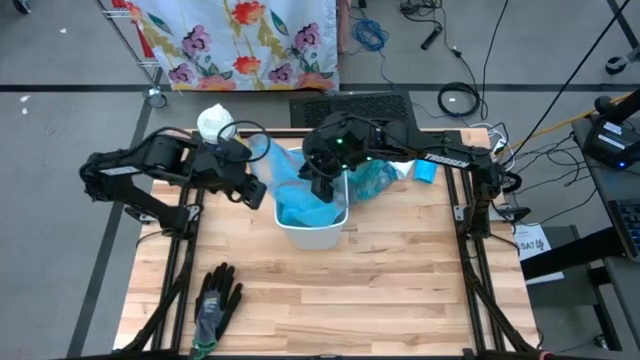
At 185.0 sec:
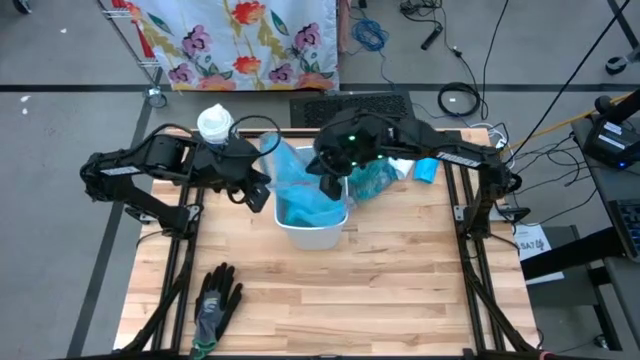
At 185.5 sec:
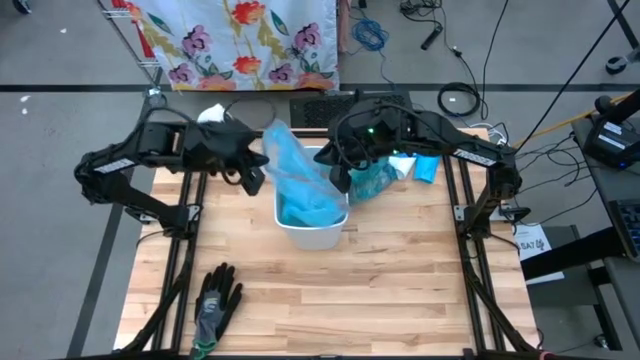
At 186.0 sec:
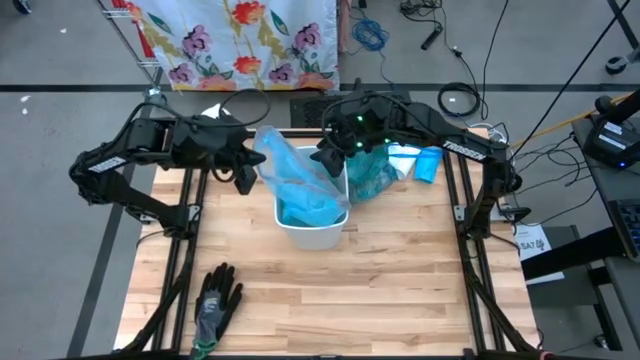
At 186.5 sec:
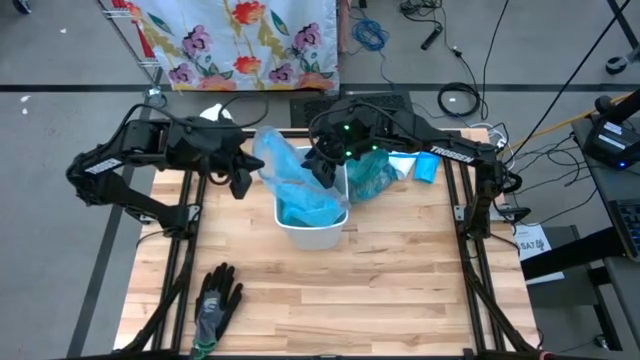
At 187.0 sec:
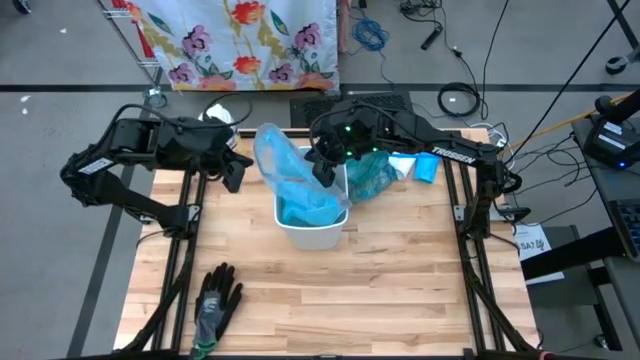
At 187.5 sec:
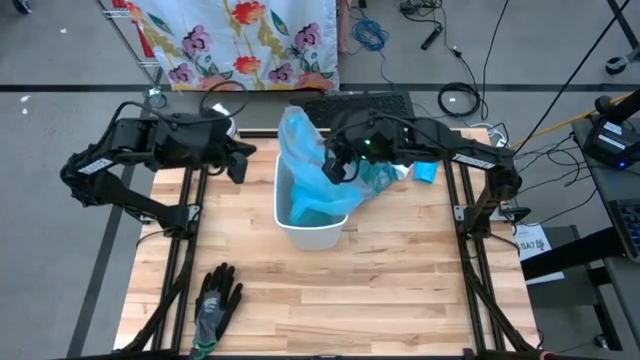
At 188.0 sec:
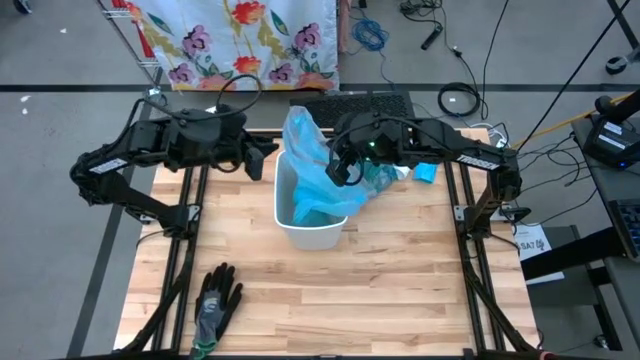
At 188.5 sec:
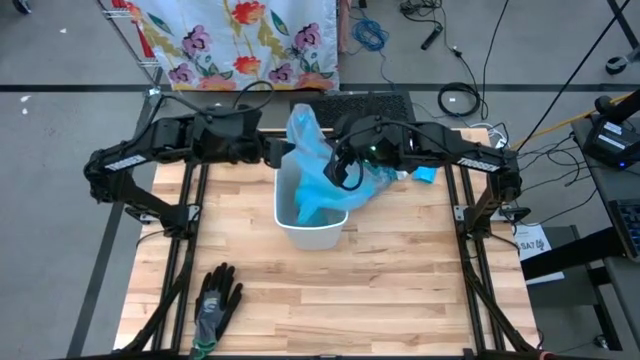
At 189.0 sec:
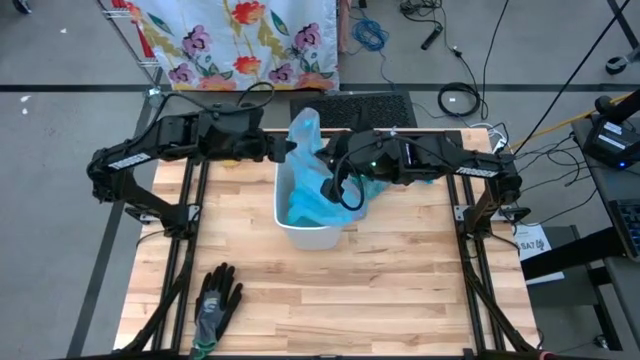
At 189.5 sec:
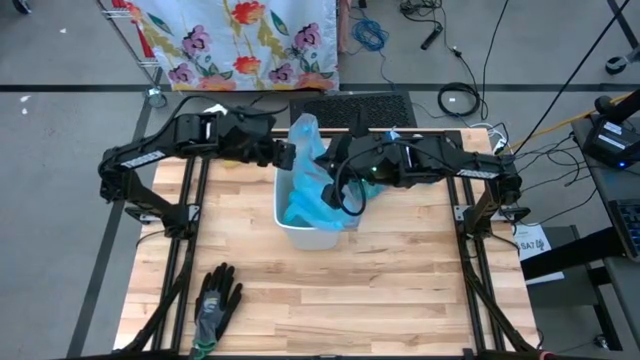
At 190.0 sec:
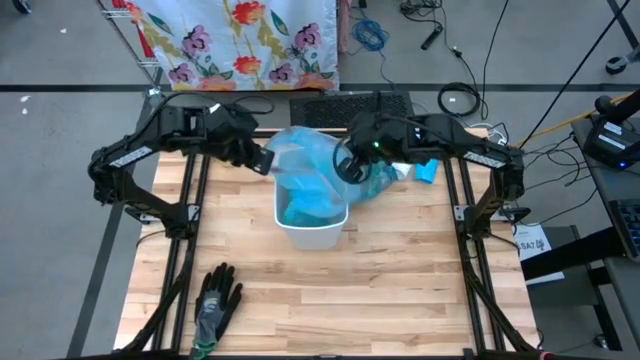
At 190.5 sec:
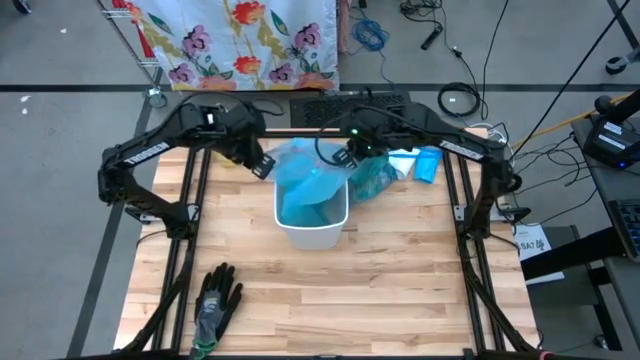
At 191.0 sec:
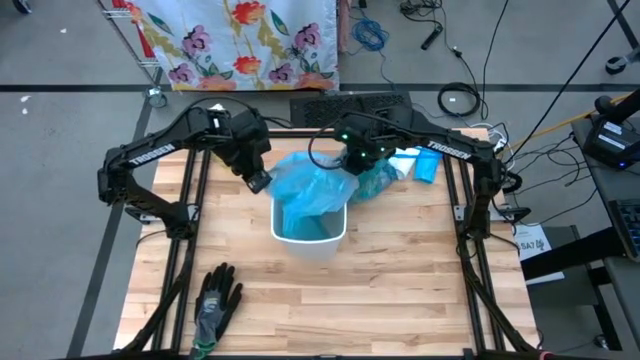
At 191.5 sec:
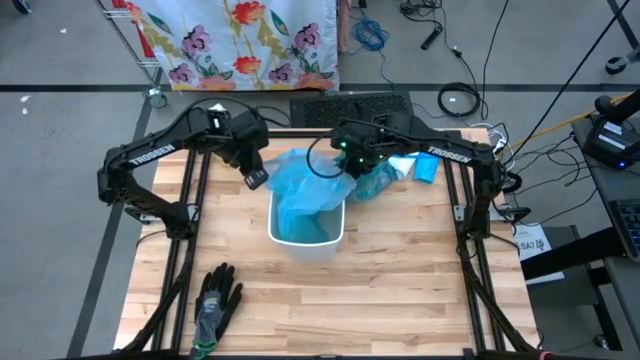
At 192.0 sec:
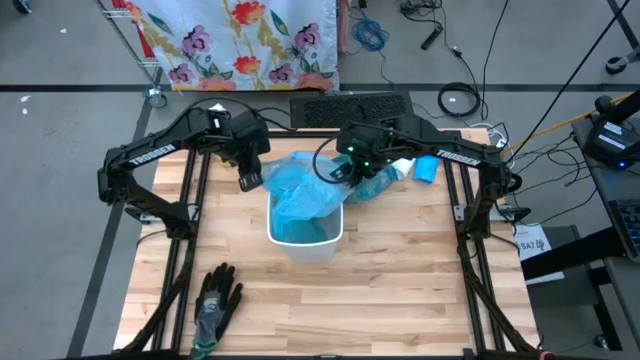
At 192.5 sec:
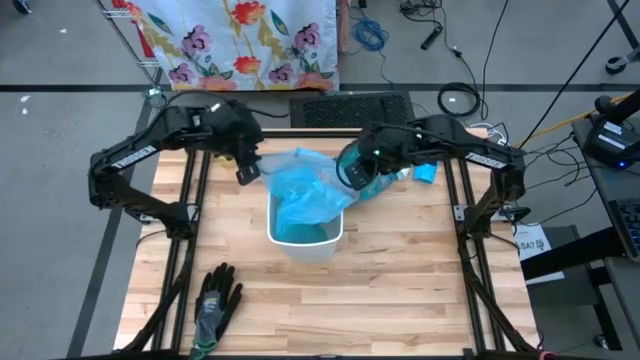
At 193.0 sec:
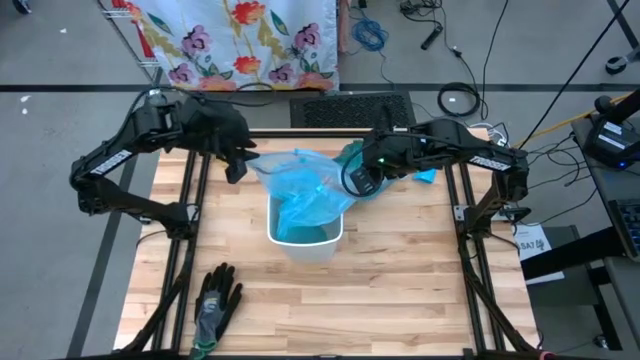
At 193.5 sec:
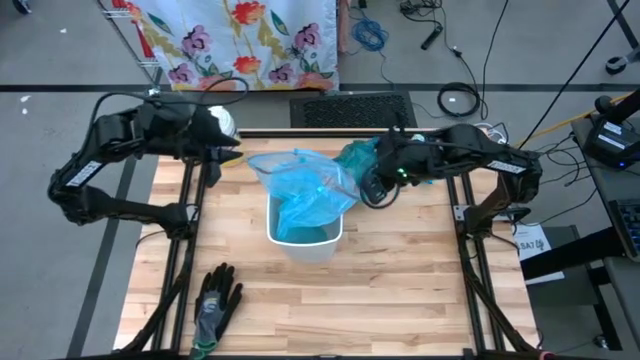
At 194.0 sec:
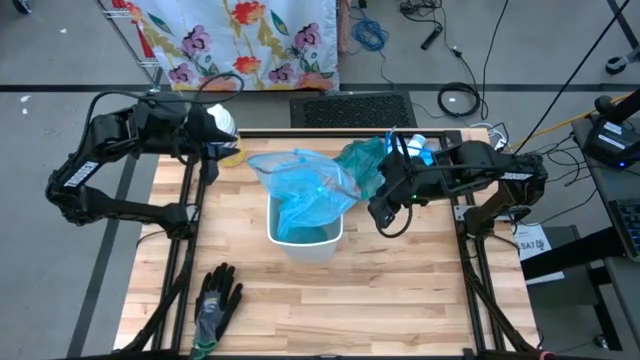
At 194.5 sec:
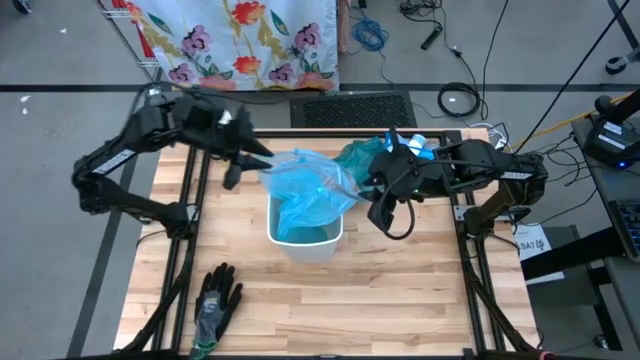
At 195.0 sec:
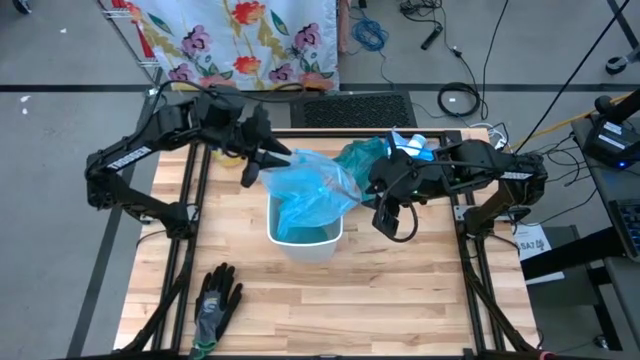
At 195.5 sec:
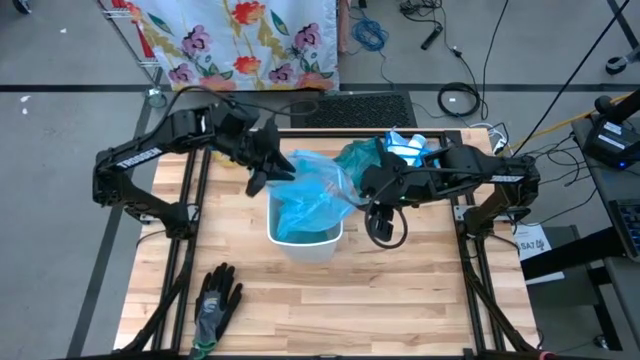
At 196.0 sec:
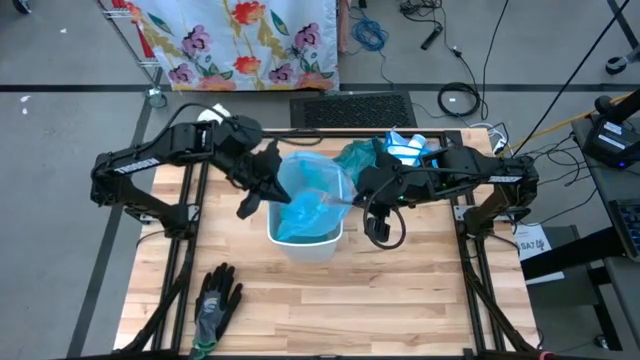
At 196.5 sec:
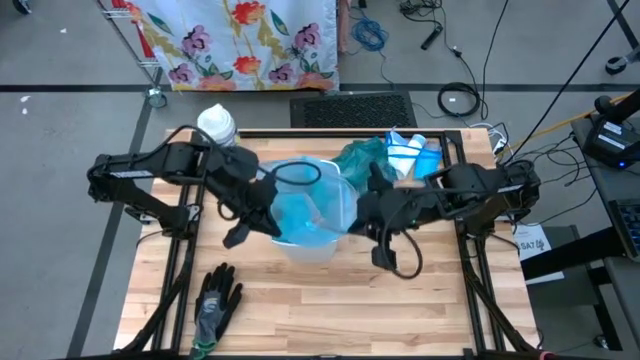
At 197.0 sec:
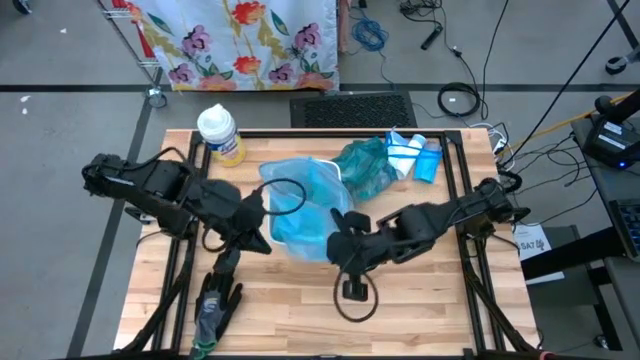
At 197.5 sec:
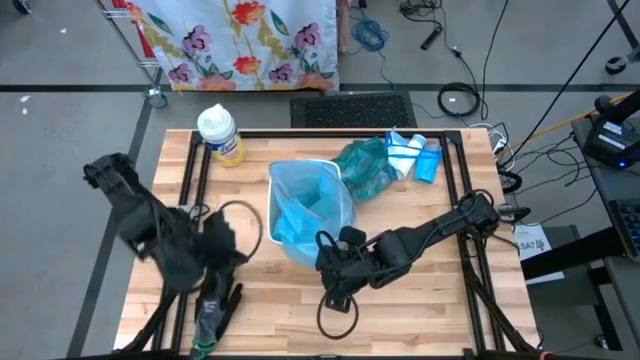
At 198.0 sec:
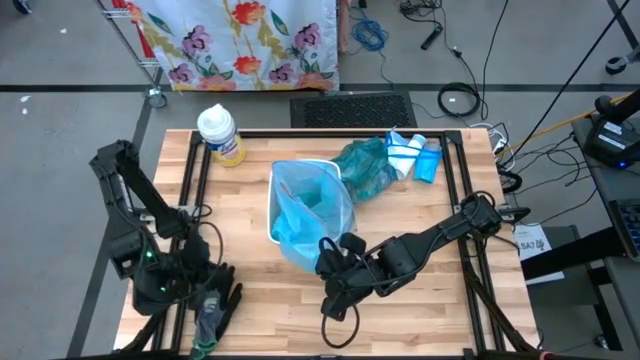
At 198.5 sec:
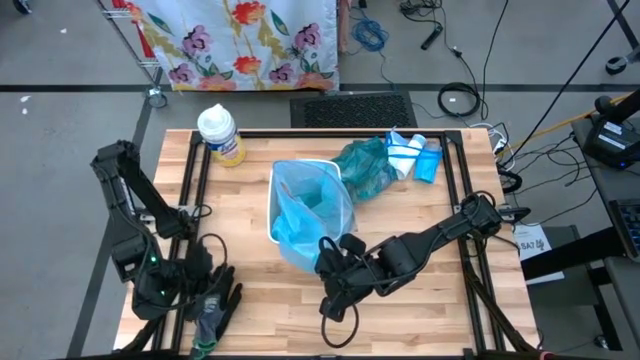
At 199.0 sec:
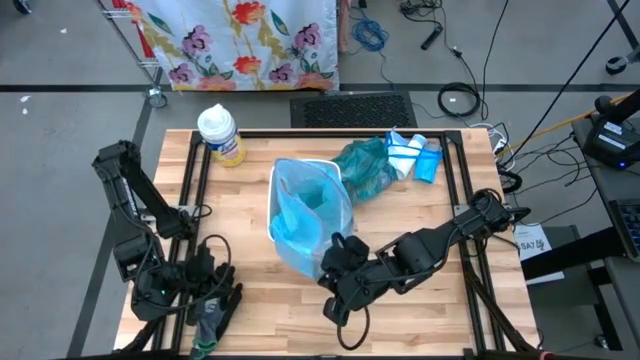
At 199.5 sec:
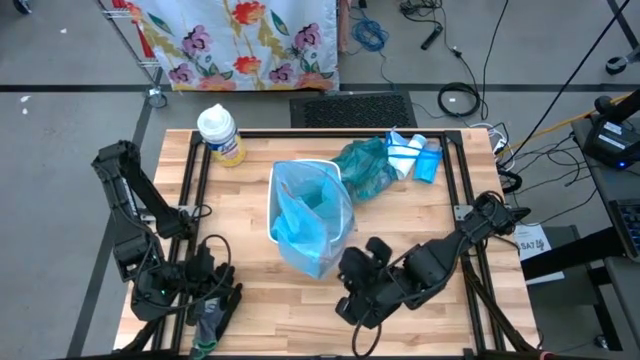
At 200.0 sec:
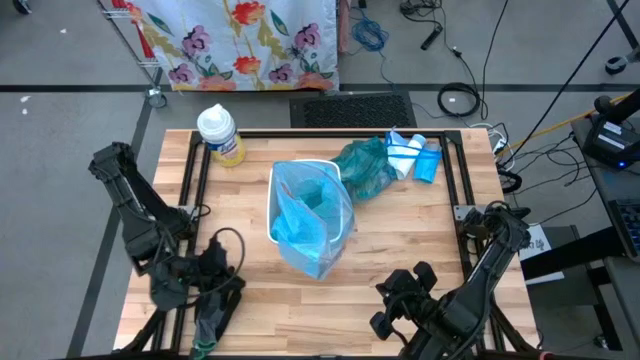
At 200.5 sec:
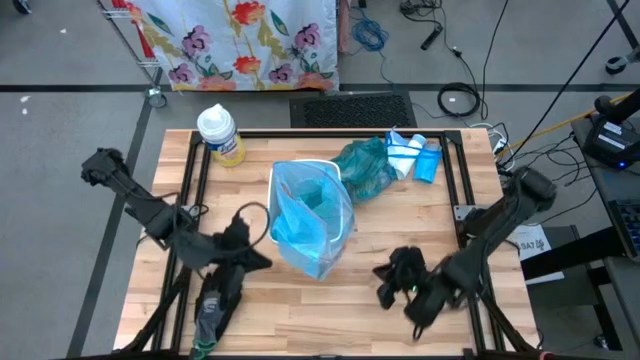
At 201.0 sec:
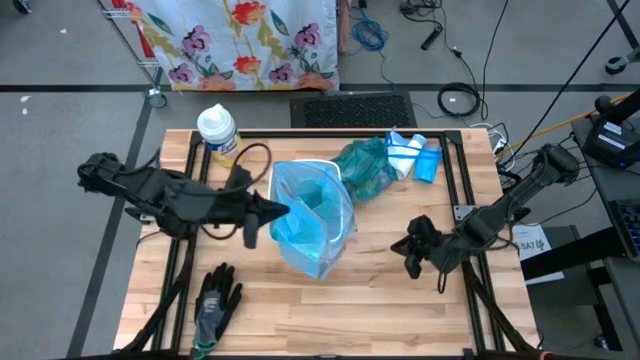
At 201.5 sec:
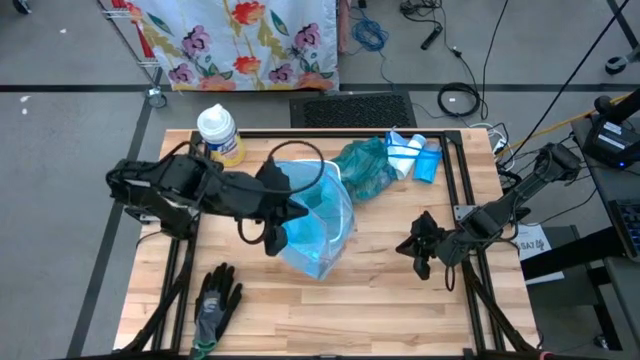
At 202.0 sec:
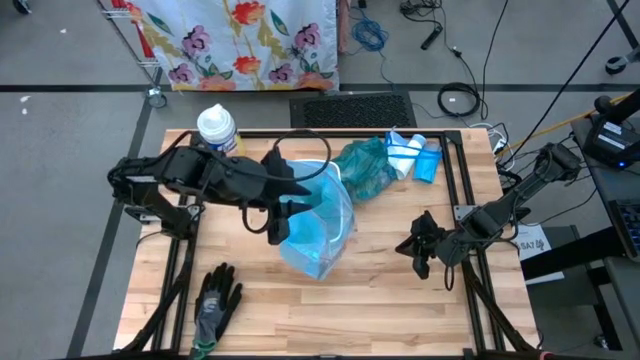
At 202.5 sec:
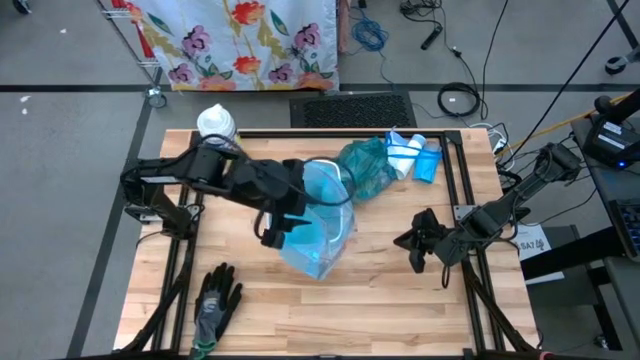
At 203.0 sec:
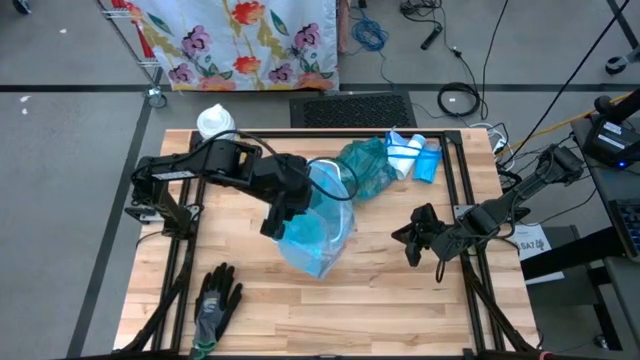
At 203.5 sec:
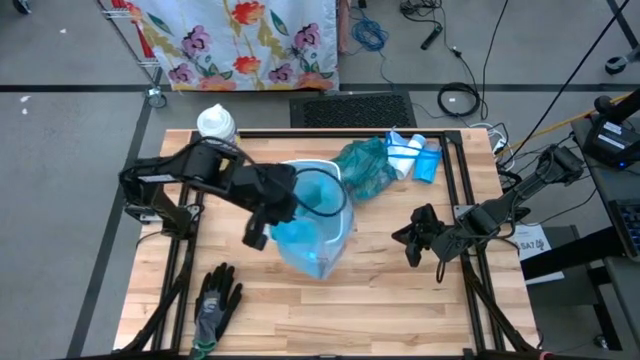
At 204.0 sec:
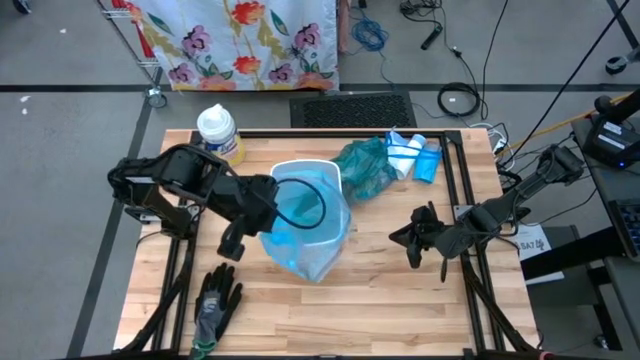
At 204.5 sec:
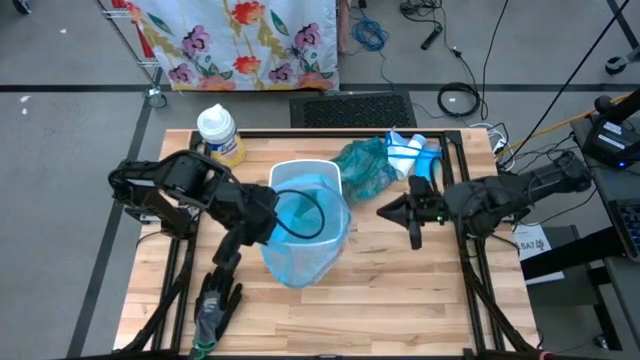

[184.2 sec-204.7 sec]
Task: place trash/remove bag and relplace
Insert the light blue trash bag into the white trash bin

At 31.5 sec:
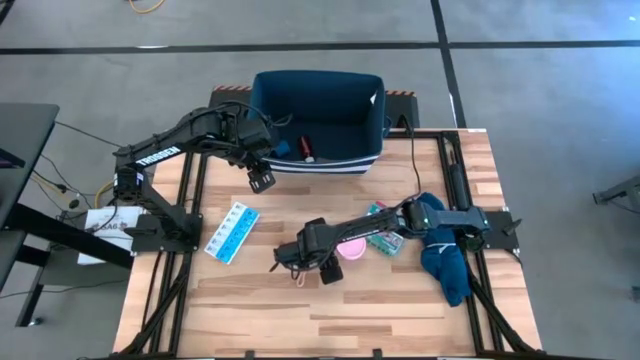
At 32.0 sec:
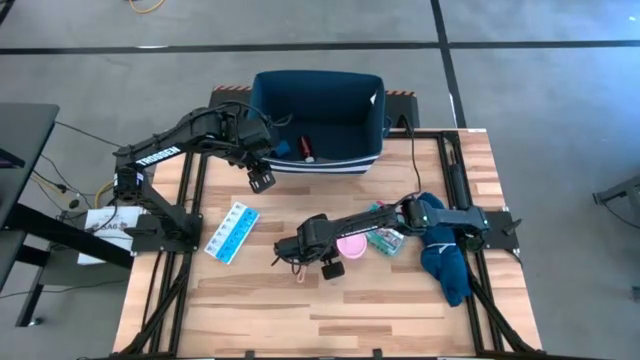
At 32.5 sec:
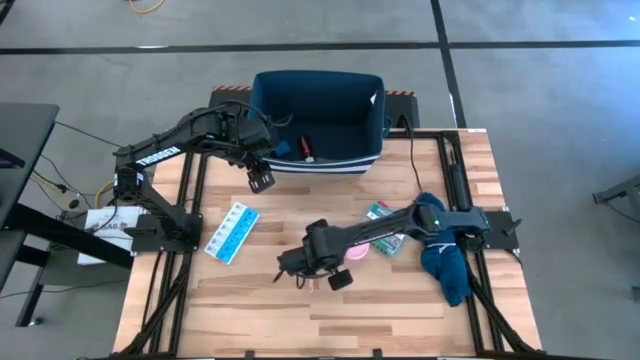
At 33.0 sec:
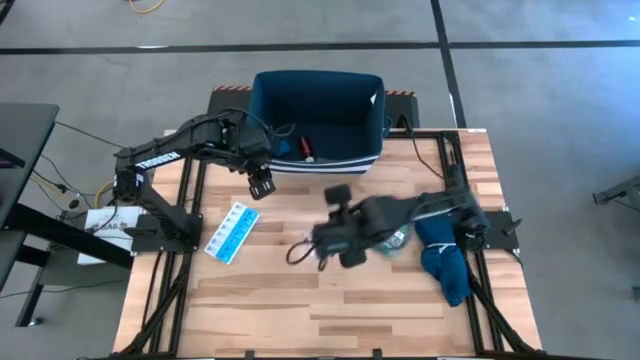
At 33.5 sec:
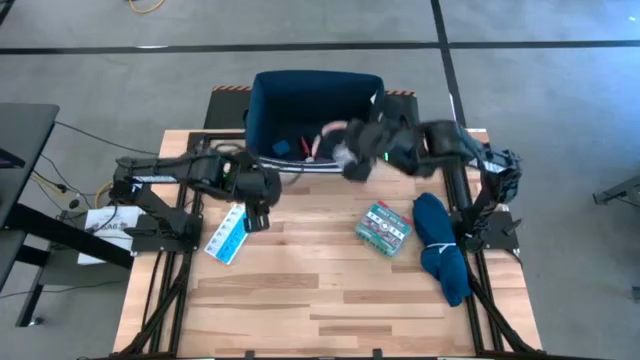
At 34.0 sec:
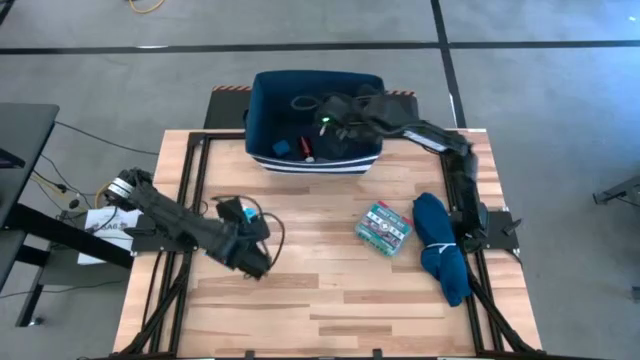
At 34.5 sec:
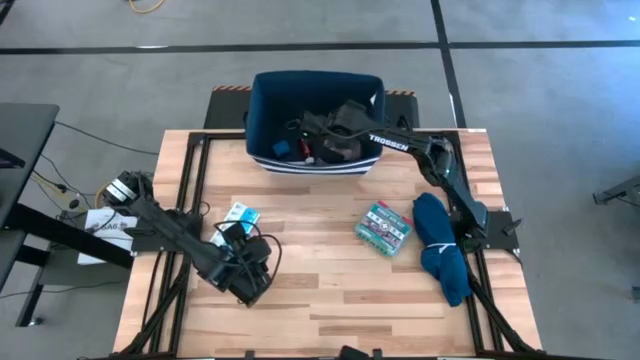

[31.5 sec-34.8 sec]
Task: Pick & place medical supplies in basket/bin
Put the pink container in the blue bin
